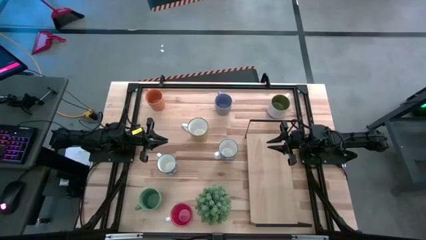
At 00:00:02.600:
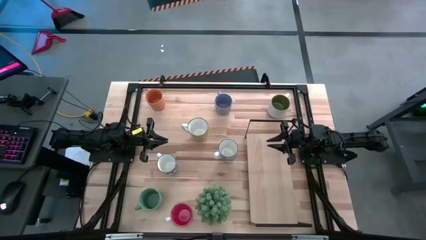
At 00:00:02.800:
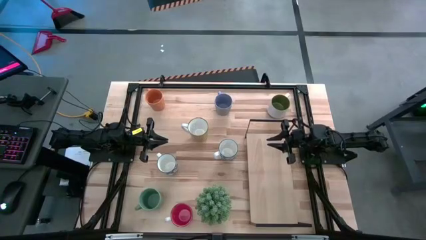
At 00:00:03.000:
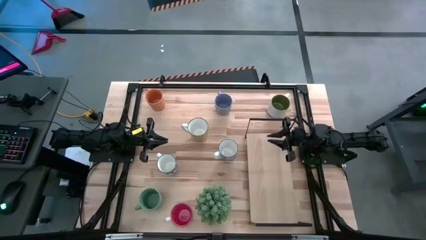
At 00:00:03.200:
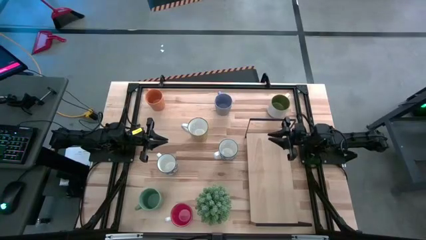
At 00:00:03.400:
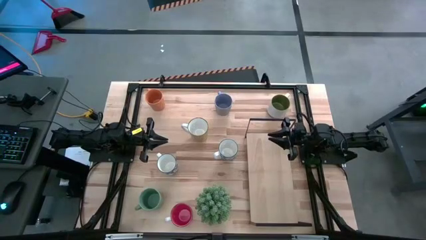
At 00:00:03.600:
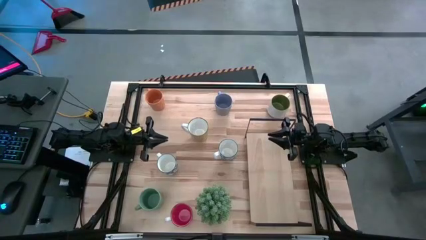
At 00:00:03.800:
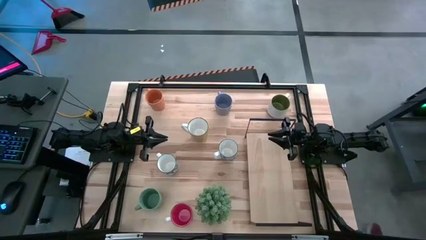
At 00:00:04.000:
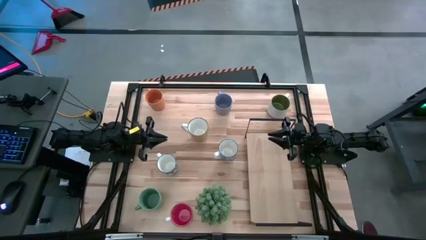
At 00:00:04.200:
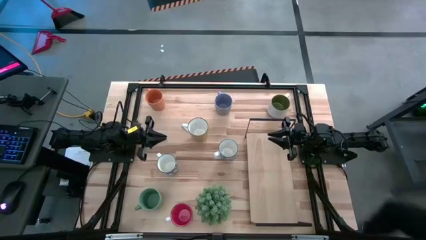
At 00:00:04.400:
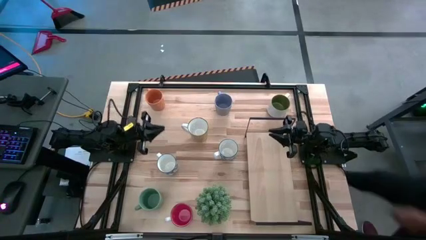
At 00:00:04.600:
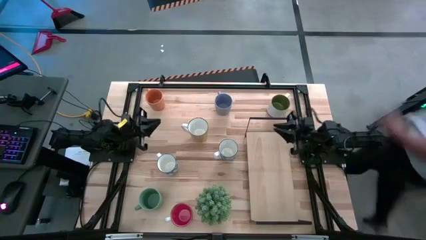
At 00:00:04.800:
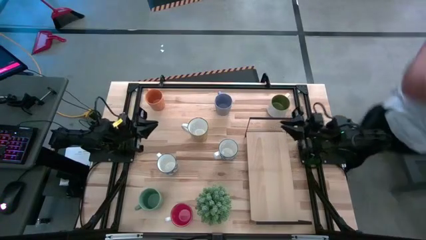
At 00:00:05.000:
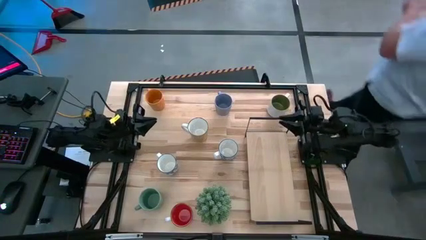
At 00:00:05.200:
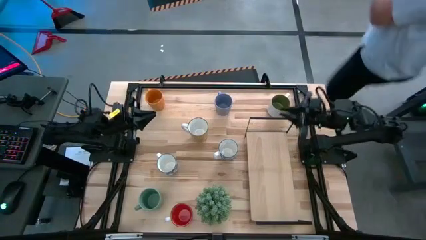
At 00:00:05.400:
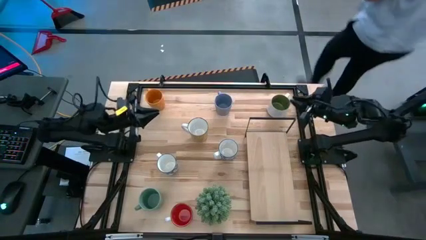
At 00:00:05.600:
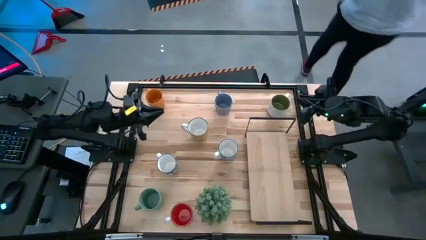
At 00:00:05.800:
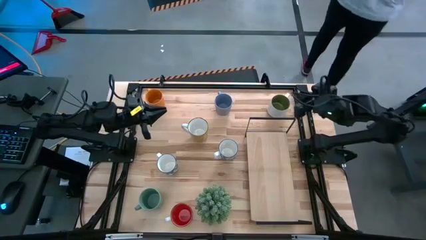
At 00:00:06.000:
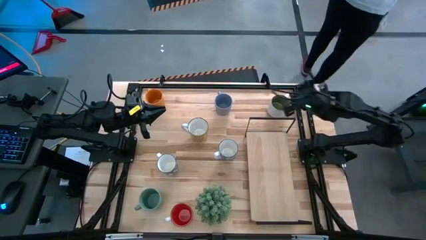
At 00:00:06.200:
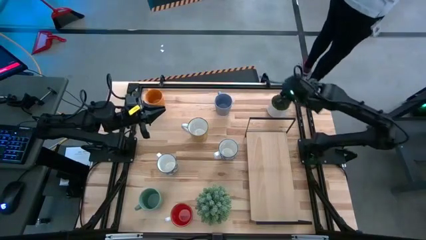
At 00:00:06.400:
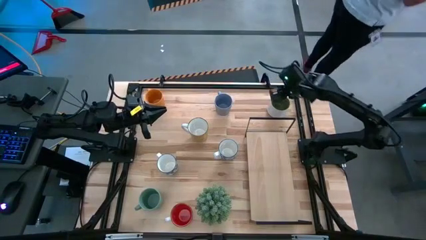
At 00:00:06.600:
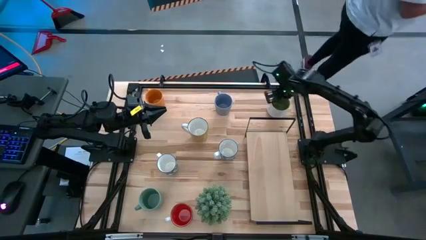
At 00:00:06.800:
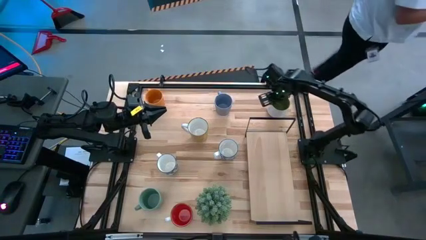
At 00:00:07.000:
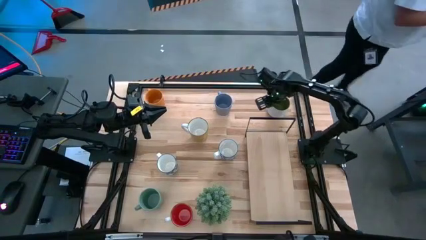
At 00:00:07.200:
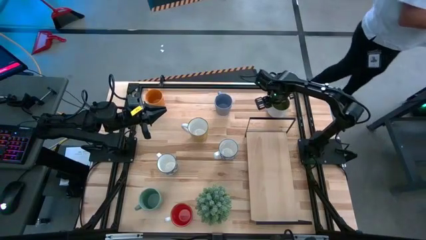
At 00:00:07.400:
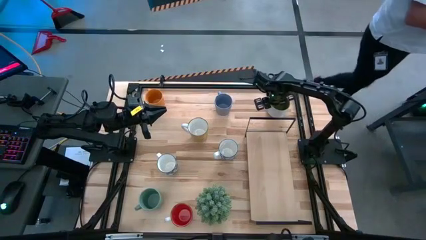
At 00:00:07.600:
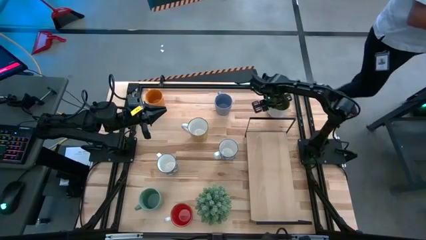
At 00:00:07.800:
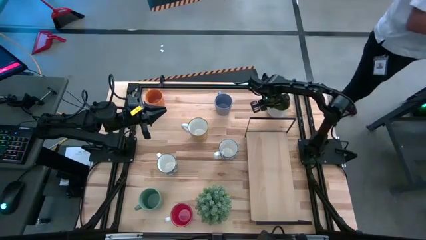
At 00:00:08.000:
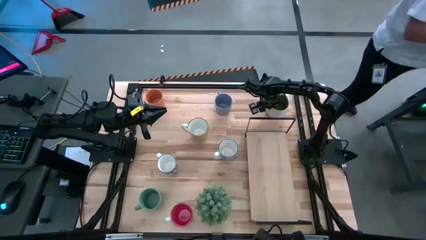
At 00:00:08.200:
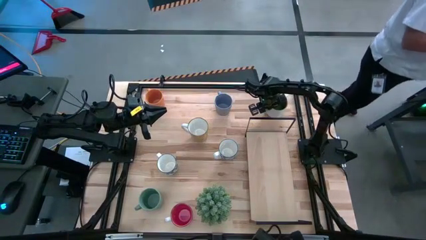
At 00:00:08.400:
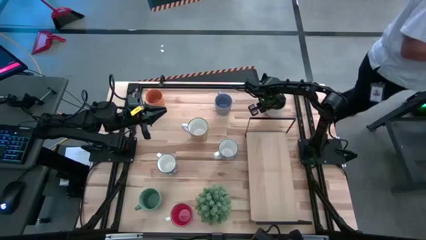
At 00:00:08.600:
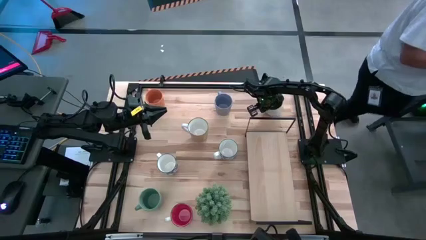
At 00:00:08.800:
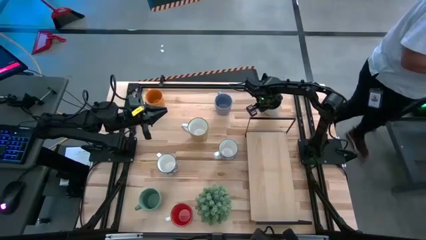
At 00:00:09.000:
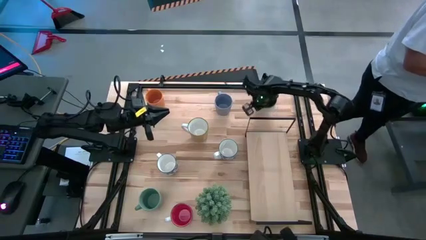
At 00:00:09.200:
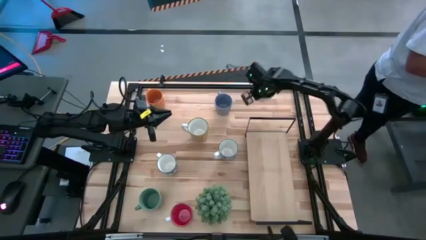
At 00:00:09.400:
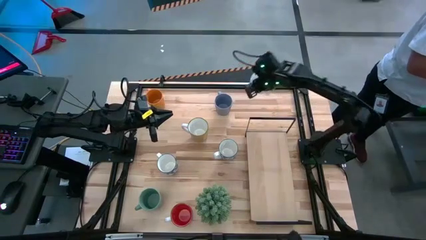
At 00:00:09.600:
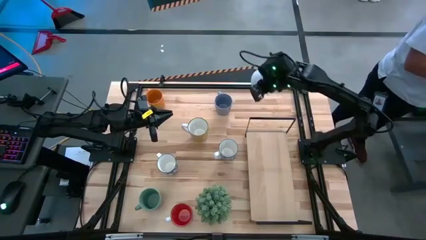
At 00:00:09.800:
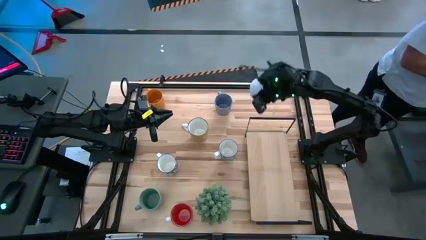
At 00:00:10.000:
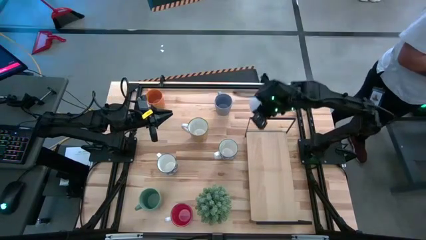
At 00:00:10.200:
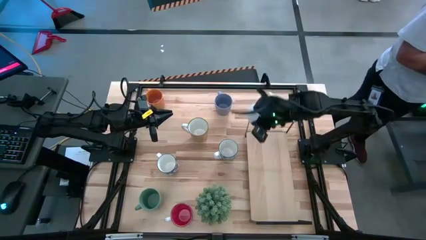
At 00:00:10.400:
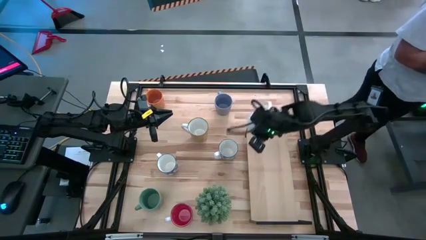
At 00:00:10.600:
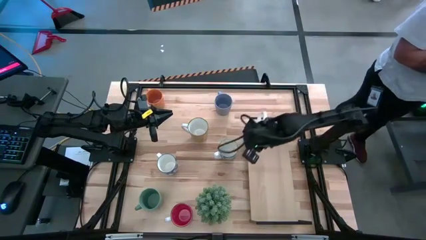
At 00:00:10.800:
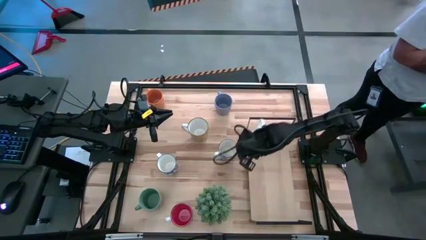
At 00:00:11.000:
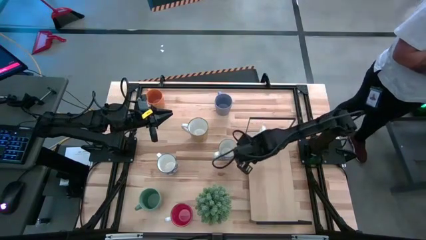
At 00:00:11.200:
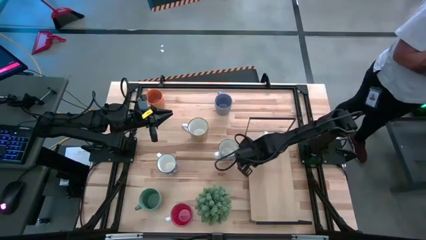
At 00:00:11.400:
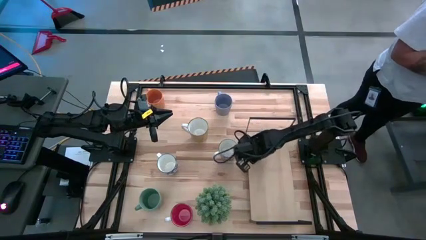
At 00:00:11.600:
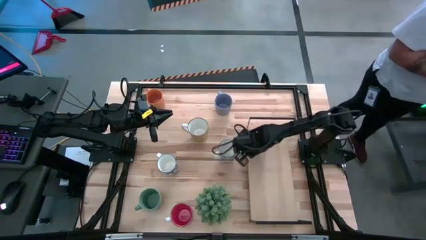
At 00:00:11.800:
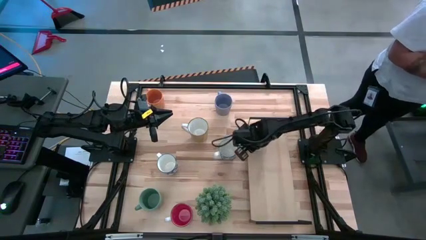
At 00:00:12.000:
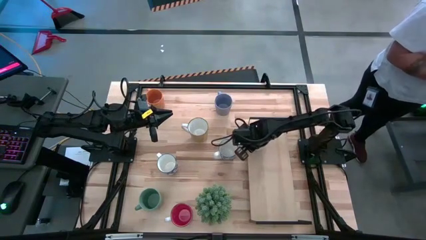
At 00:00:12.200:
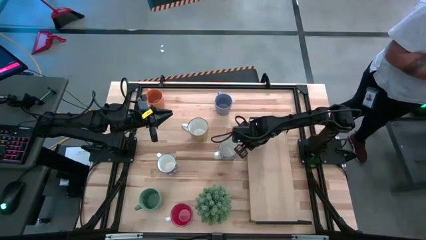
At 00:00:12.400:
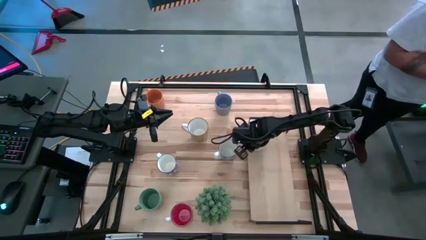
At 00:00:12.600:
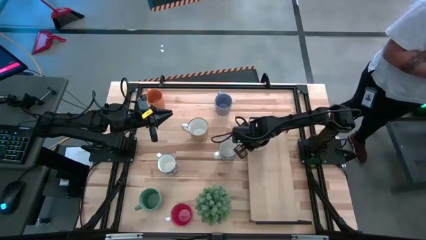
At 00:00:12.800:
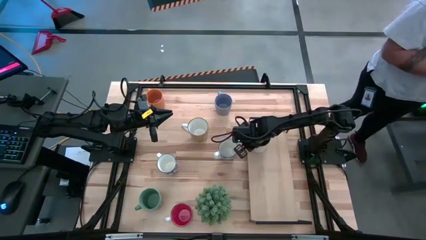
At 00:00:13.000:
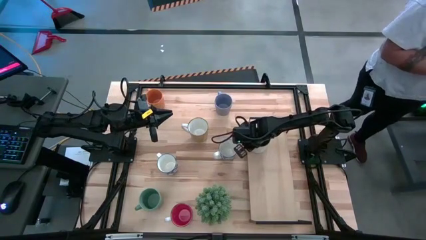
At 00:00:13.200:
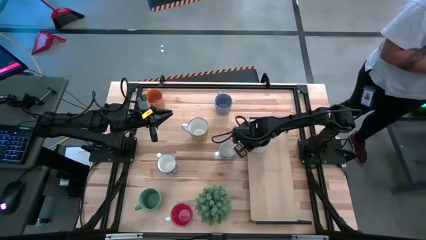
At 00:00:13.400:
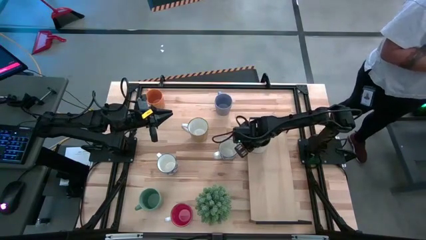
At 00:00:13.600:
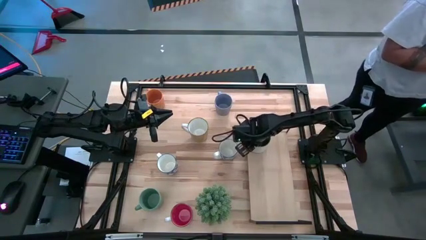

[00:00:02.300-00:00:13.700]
Task: Place coffee mugs
Put the dark green mug on the shelf

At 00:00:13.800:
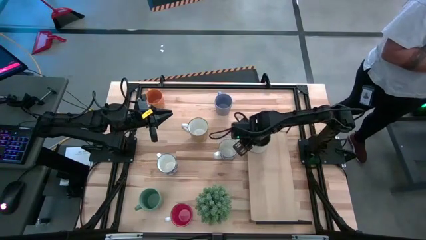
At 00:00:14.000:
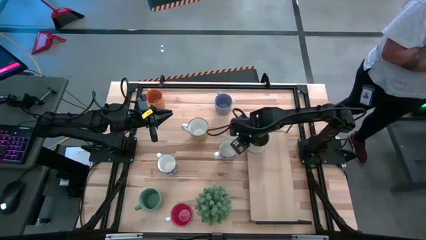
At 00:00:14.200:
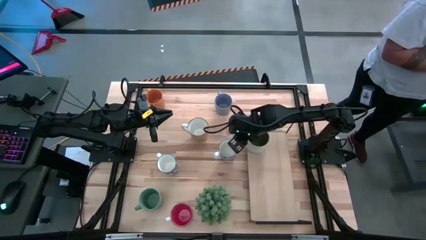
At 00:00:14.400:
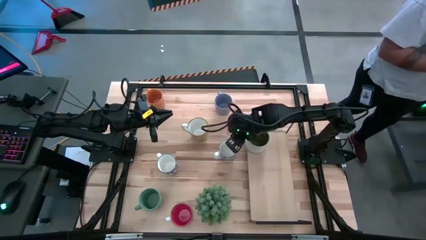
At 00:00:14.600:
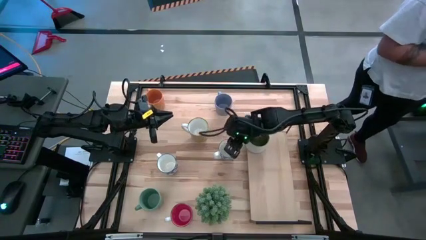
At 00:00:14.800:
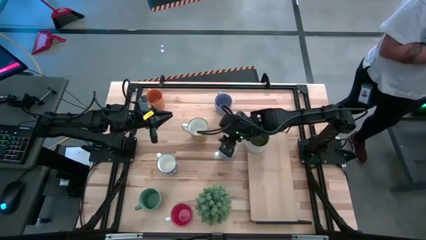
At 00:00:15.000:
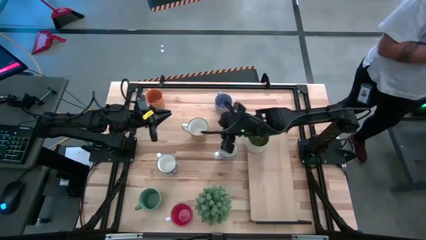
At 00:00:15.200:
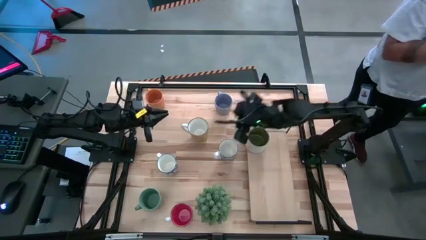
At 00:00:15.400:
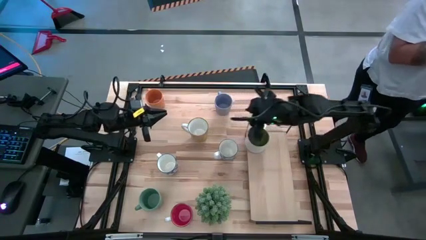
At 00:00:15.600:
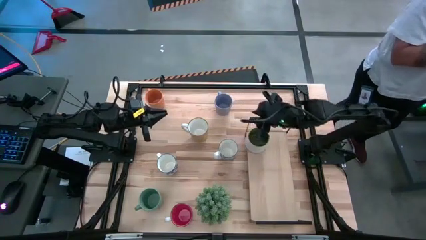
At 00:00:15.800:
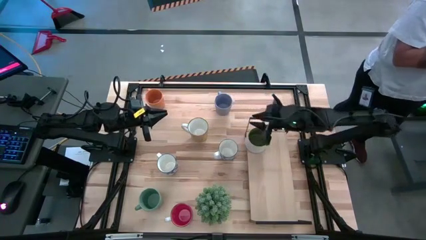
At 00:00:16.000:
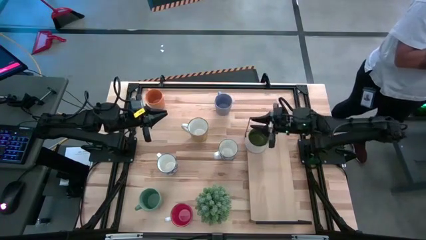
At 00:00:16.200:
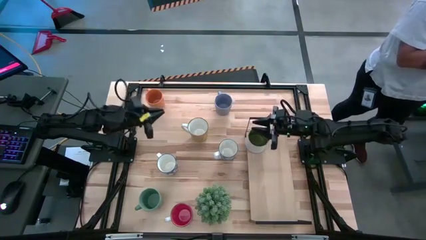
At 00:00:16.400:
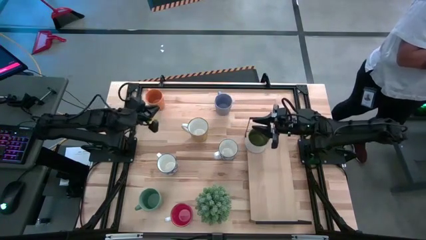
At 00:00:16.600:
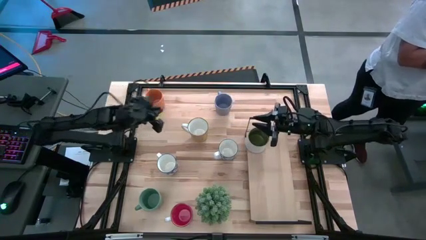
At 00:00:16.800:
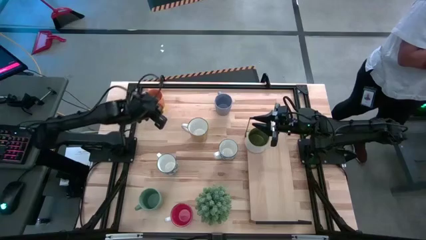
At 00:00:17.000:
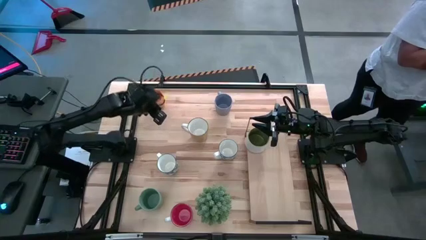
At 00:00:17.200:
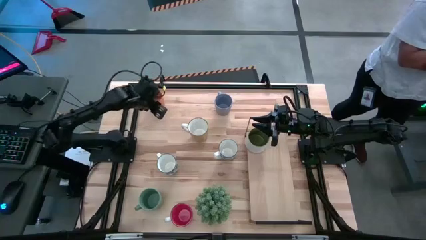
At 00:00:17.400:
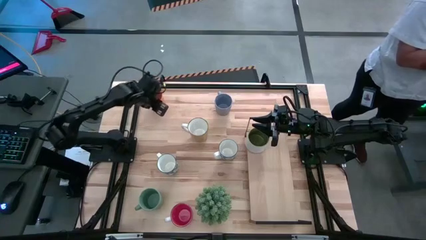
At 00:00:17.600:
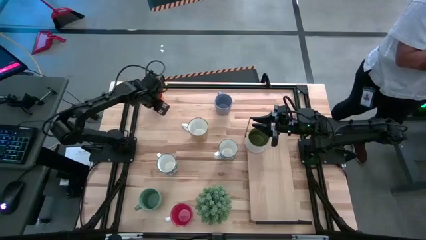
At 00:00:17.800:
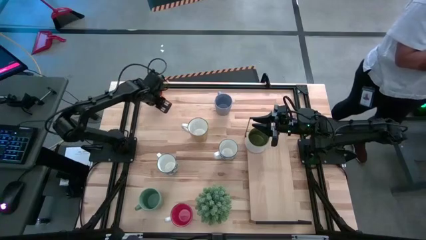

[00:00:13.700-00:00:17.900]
Put the orange mug on the shelf
